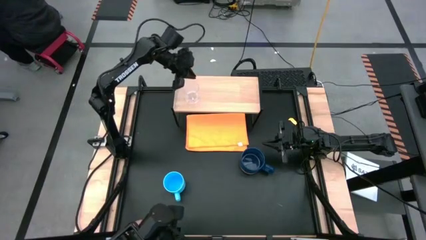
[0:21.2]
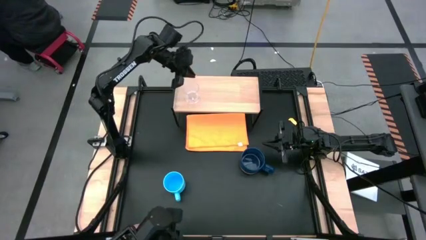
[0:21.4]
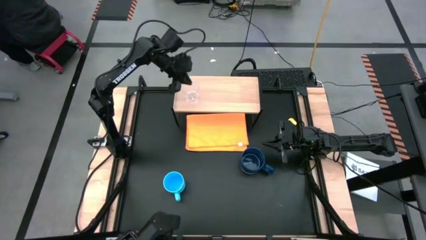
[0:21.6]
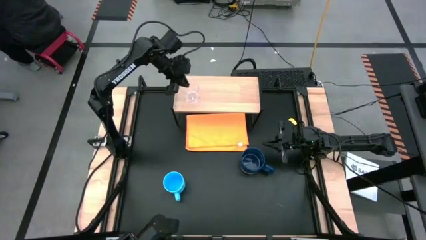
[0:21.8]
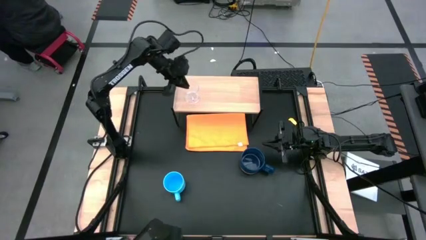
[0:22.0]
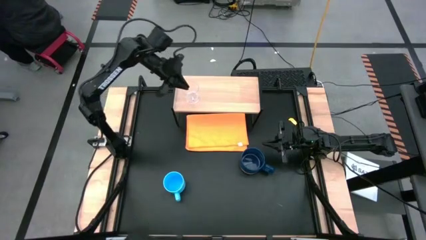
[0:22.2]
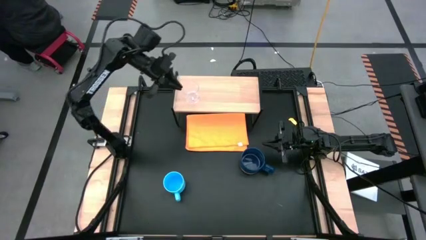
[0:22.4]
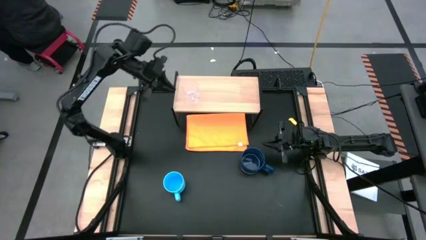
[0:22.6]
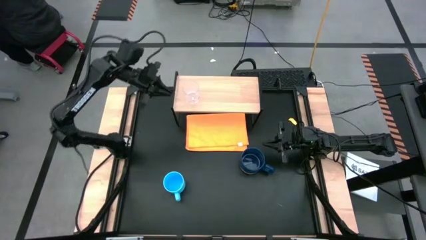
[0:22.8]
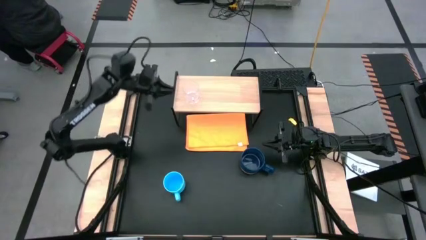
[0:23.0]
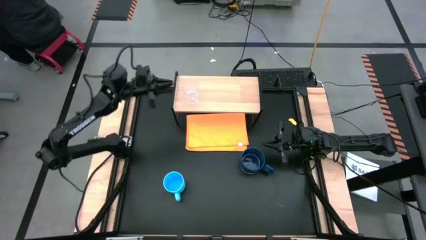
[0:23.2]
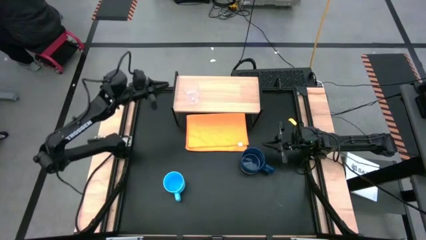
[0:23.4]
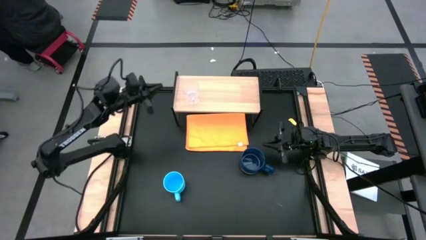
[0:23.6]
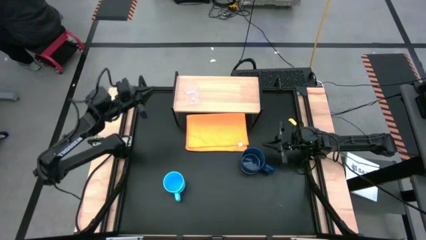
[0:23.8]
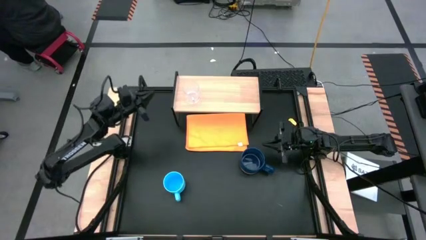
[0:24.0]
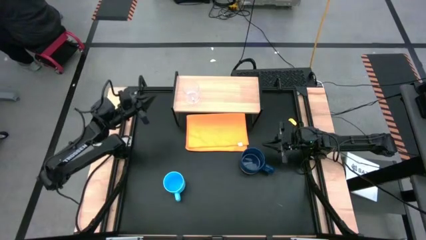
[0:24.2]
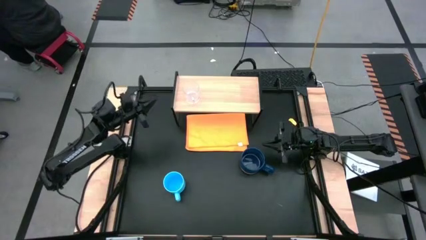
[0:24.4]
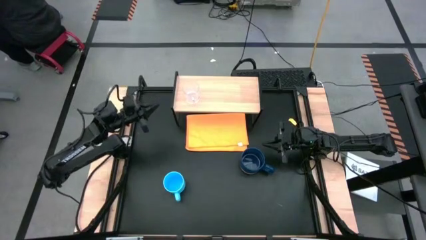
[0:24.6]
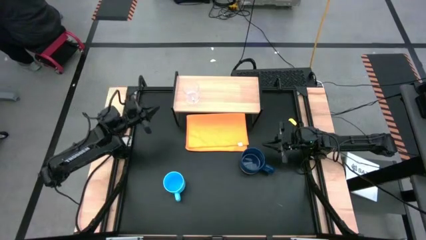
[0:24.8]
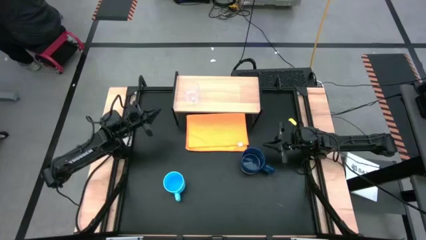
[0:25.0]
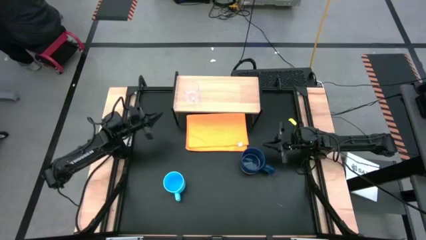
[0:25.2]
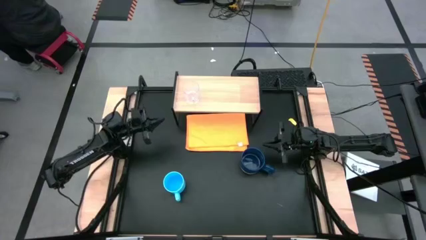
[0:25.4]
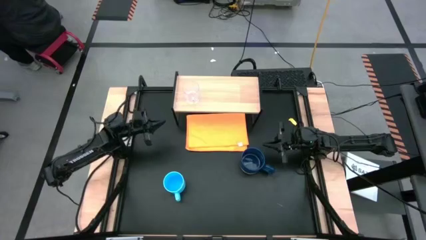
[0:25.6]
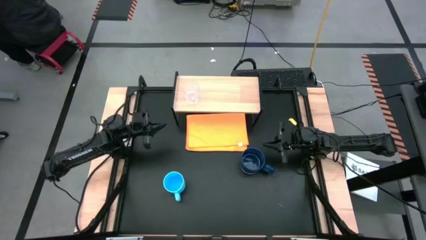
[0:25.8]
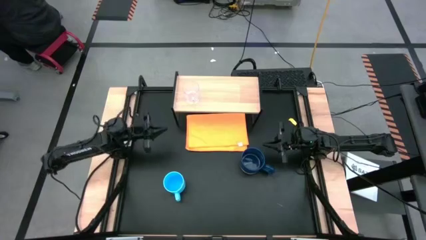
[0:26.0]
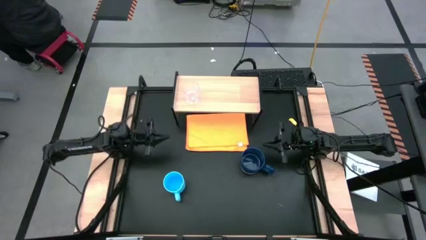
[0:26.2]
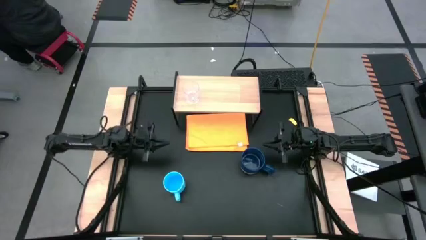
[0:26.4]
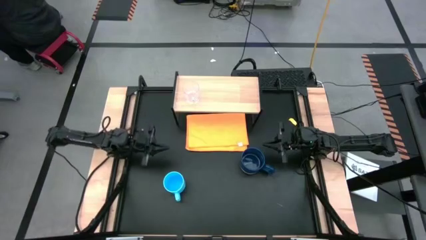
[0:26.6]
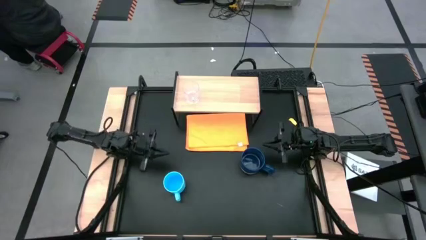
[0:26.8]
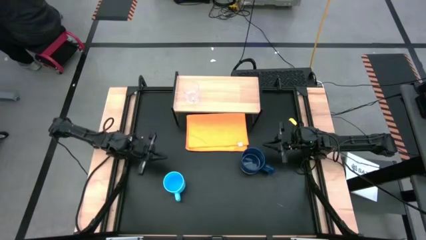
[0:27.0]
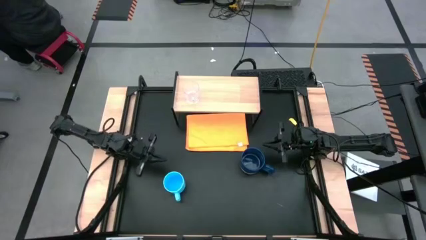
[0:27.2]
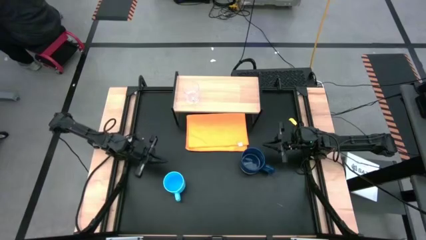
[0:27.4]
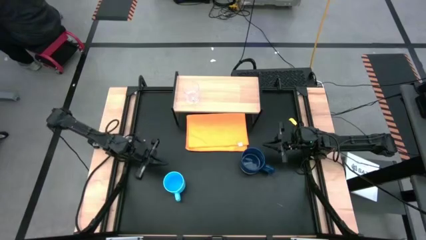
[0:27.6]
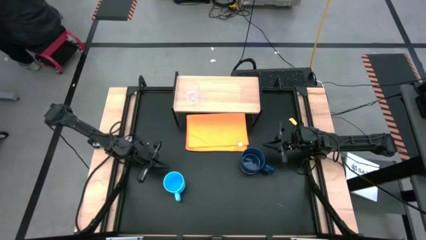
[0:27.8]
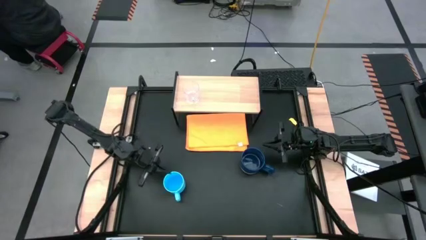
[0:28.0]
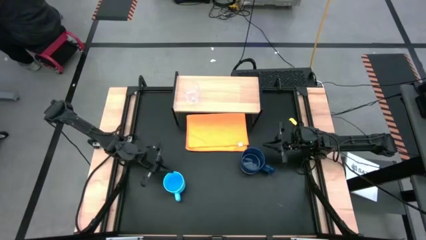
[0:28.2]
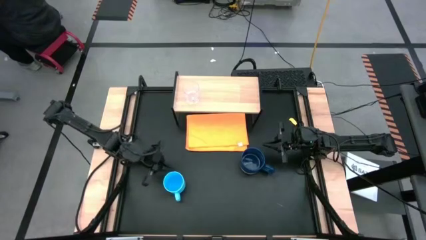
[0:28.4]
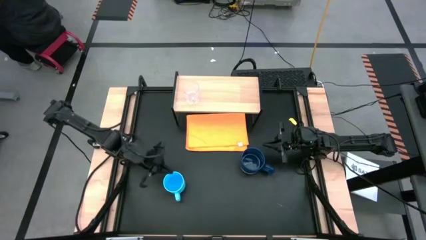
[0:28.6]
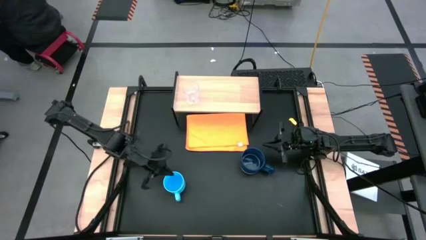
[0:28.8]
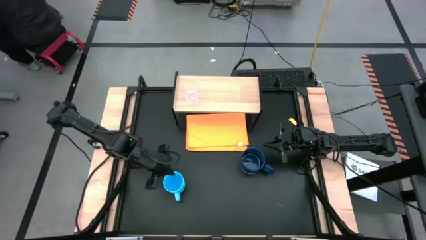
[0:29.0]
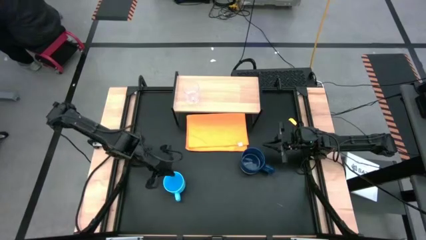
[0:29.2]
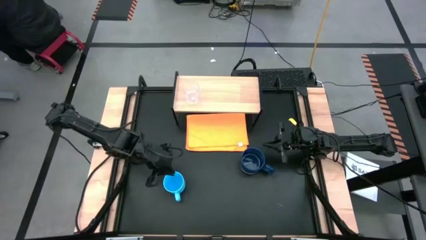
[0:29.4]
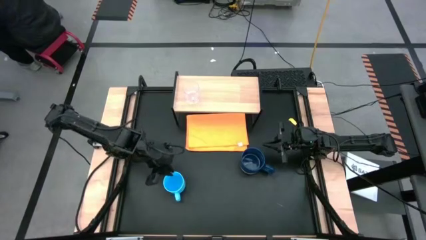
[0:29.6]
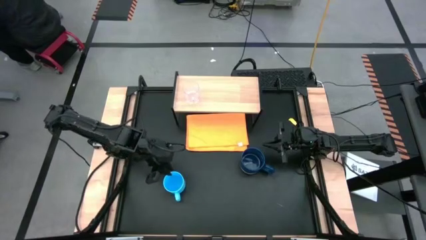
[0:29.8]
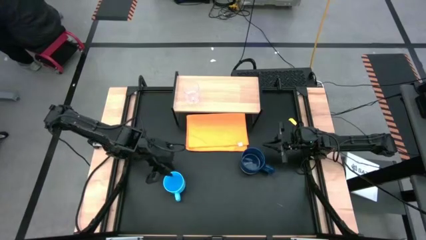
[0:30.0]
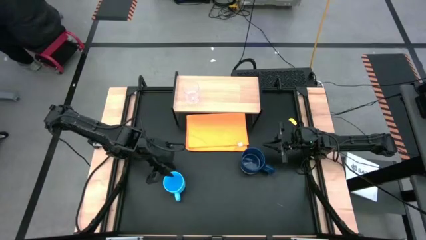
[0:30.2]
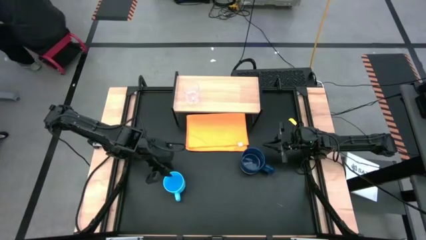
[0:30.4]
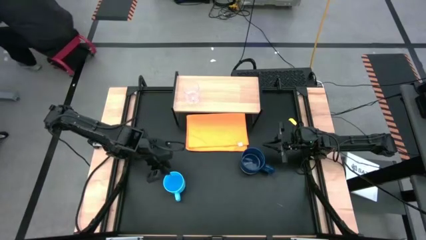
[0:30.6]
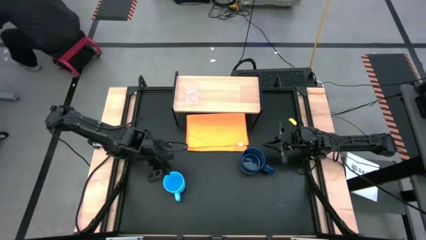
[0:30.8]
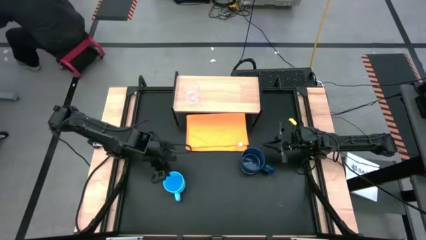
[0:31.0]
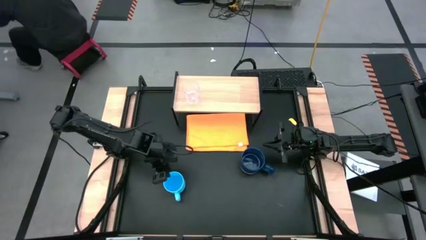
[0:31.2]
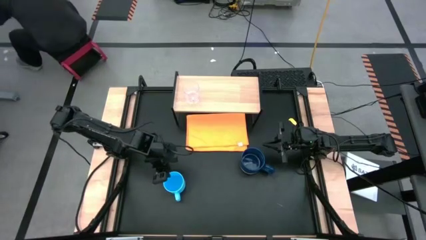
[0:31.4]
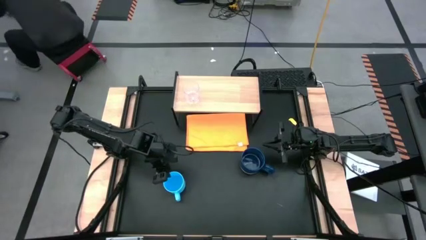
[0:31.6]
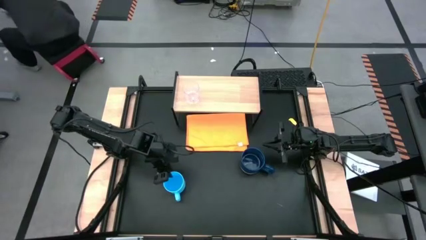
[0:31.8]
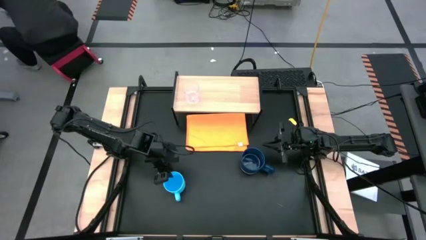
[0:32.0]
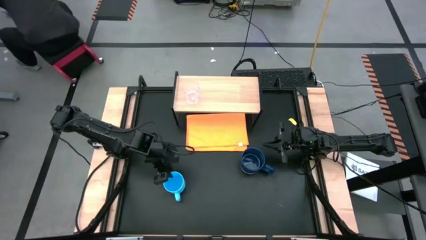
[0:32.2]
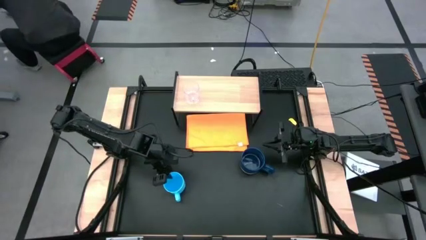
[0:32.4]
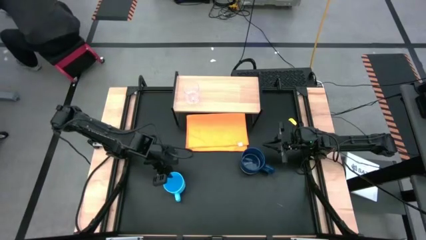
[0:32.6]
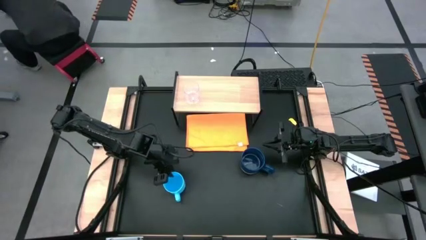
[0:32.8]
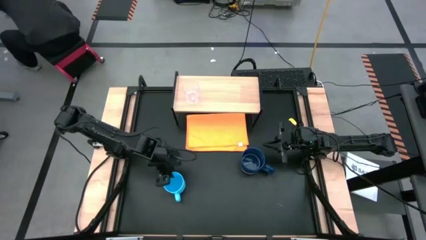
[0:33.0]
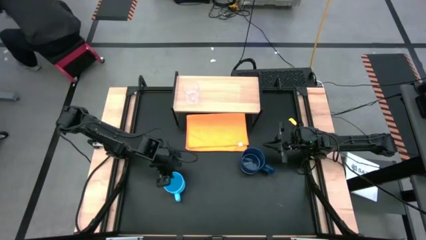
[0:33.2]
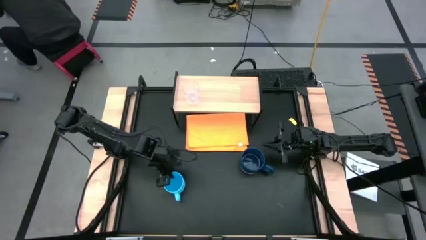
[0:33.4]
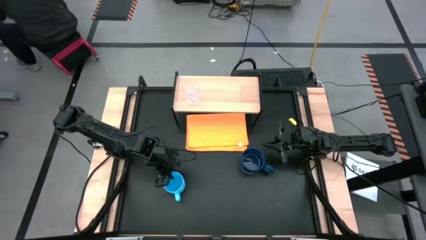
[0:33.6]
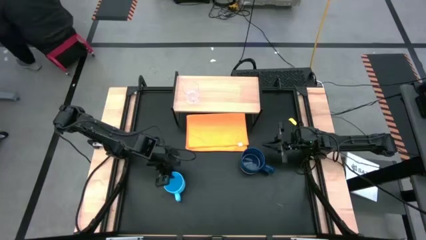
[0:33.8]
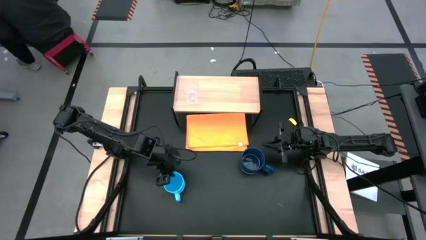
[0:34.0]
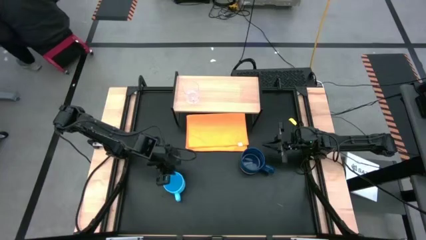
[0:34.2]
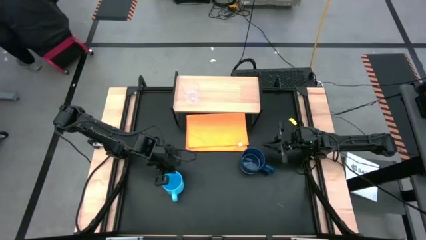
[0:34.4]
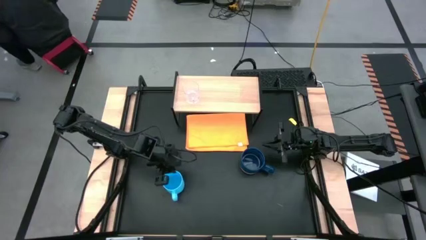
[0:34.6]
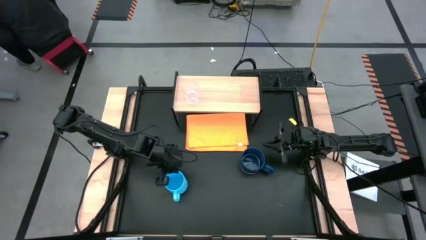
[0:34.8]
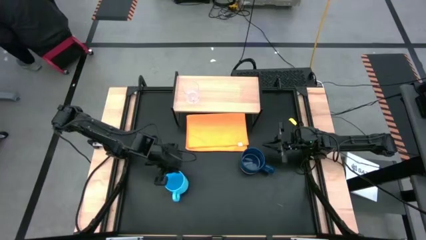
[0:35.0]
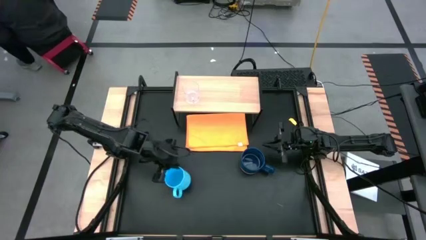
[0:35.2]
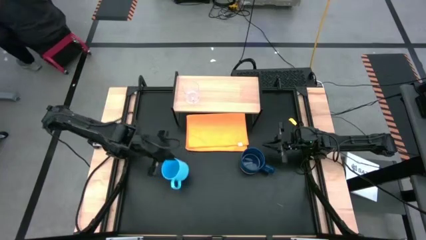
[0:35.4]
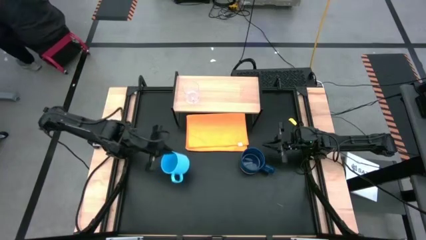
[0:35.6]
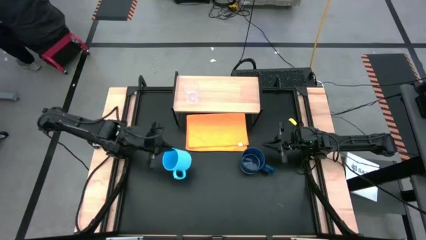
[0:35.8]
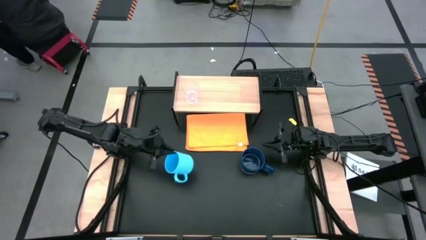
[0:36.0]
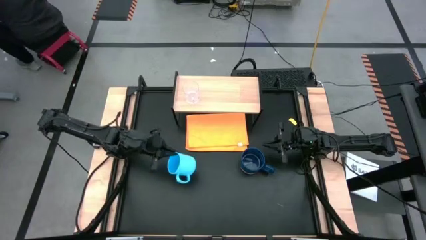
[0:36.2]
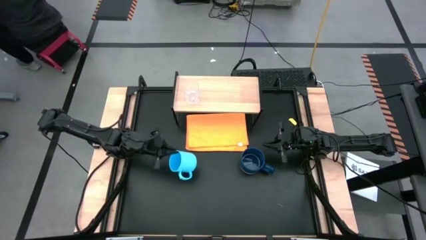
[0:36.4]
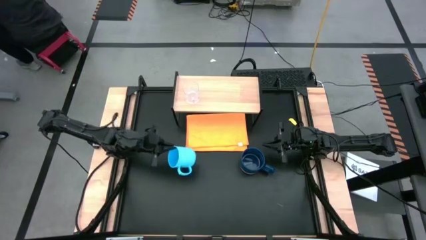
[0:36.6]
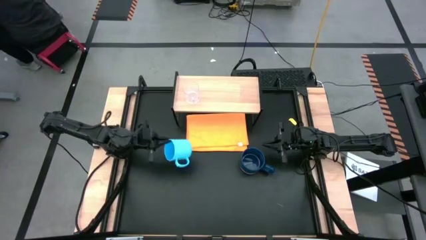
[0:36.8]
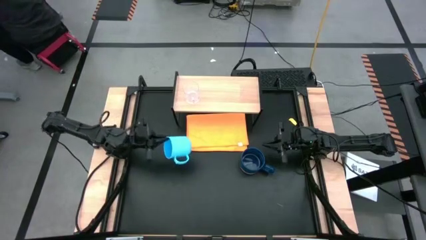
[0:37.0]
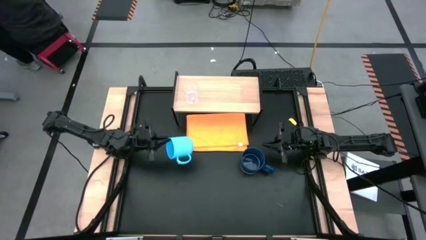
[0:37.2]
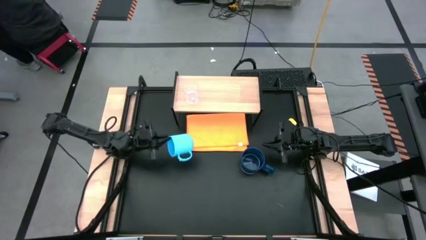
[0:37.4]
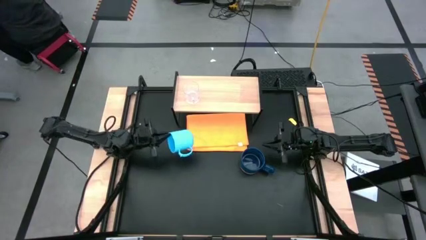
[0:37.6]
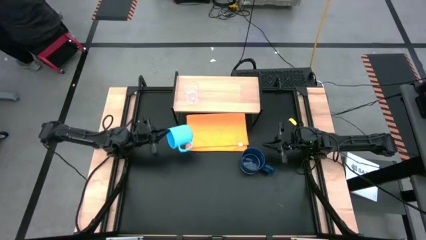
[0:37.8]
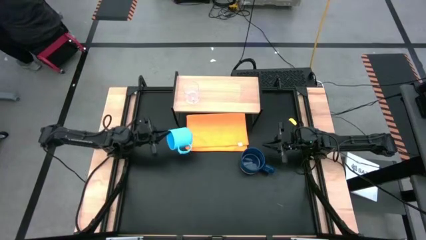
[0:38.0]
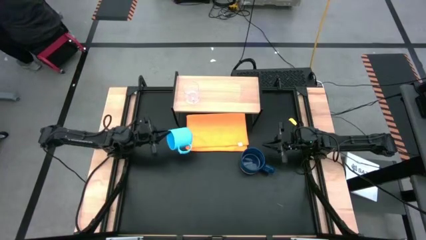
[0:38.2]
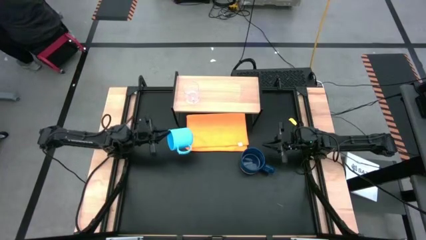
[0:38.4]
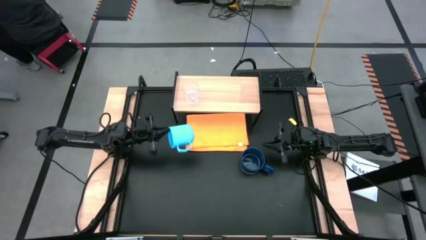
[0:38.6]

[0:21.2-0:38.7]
Task: Stack small to large cups/mugs on shelf
Put the light blue mug on the shelf
